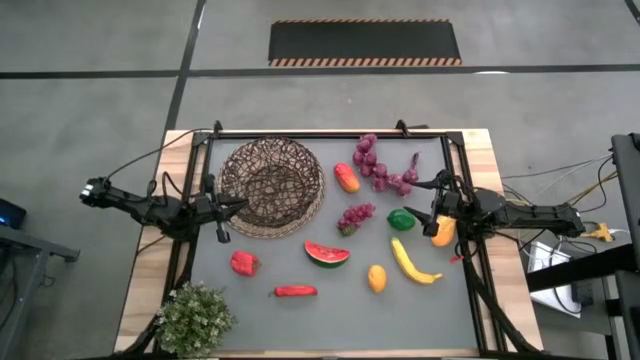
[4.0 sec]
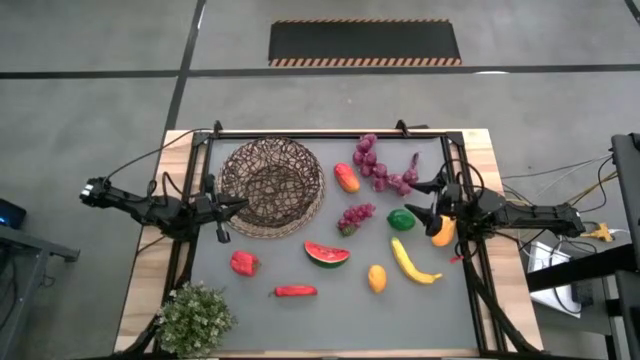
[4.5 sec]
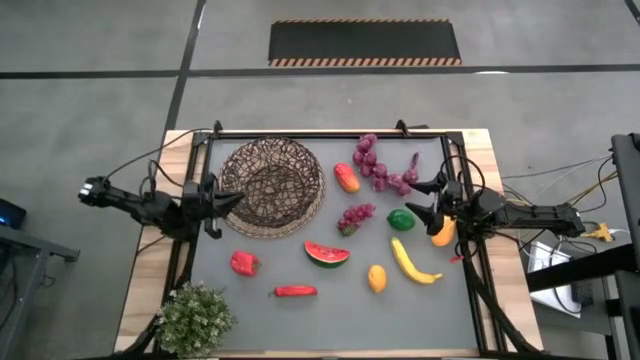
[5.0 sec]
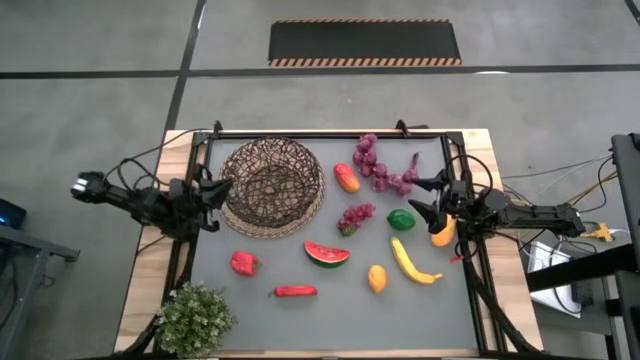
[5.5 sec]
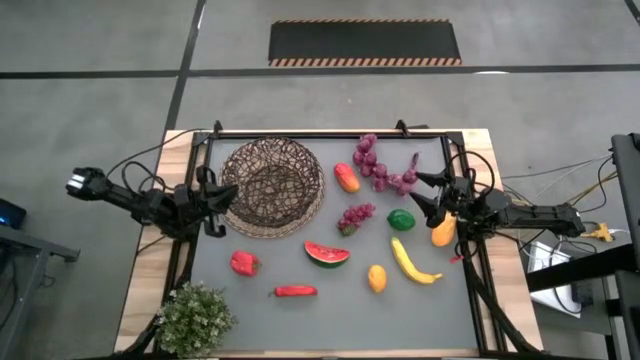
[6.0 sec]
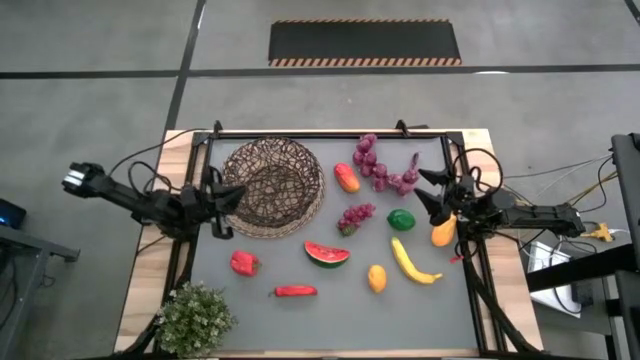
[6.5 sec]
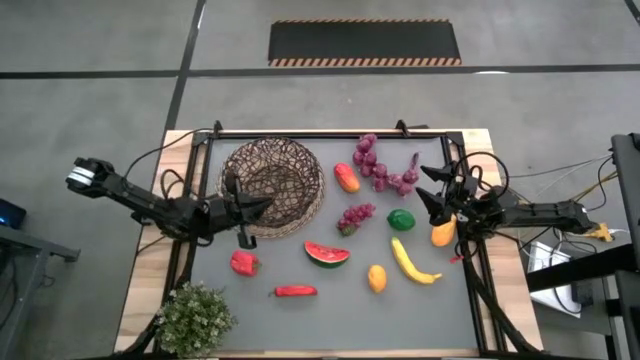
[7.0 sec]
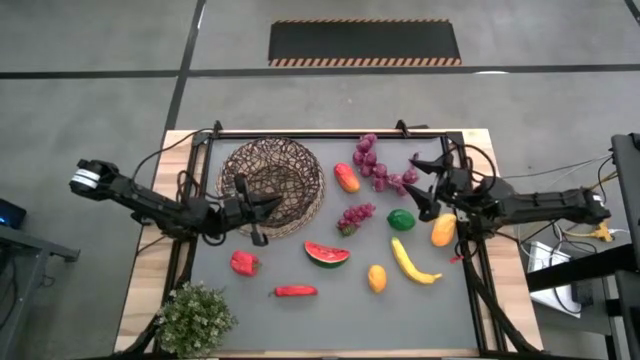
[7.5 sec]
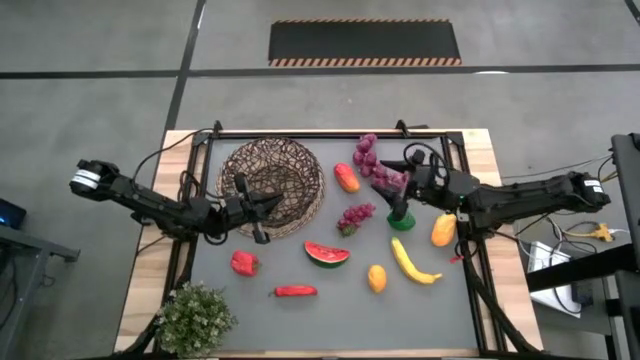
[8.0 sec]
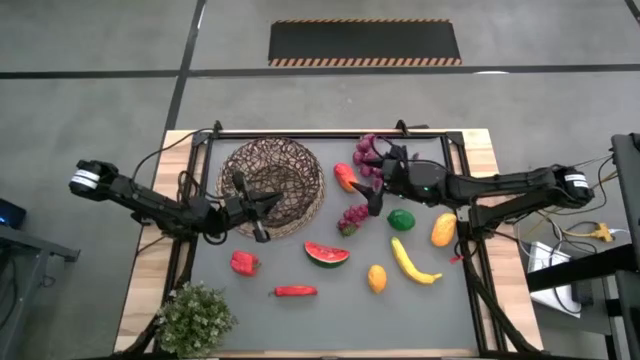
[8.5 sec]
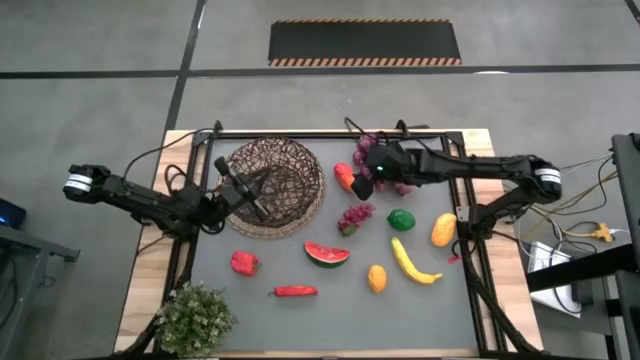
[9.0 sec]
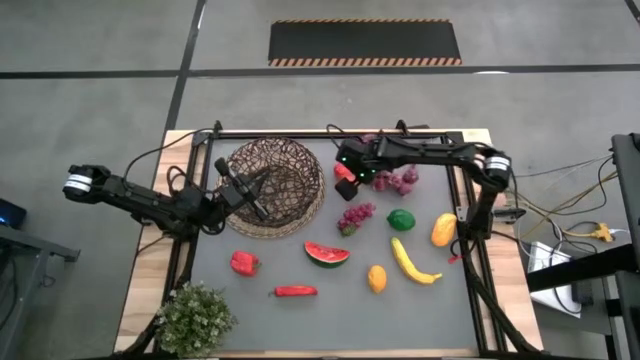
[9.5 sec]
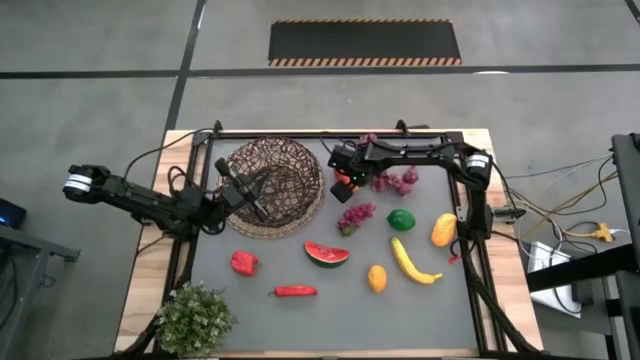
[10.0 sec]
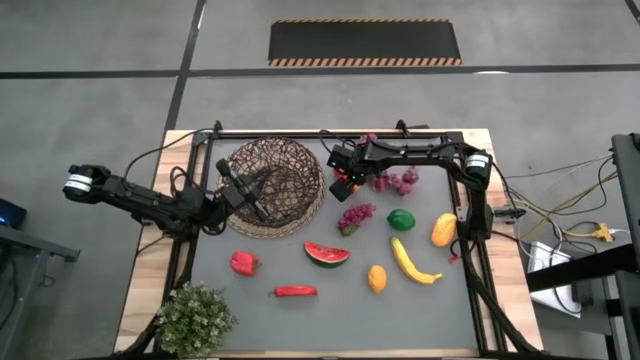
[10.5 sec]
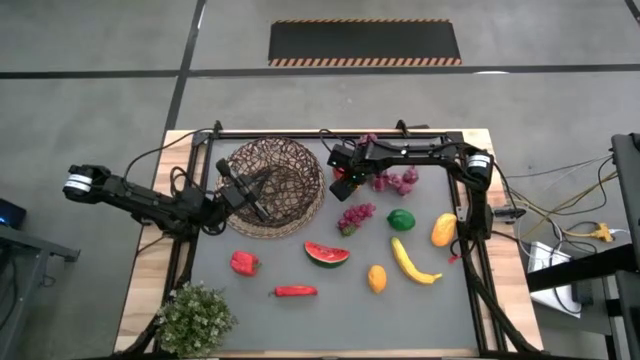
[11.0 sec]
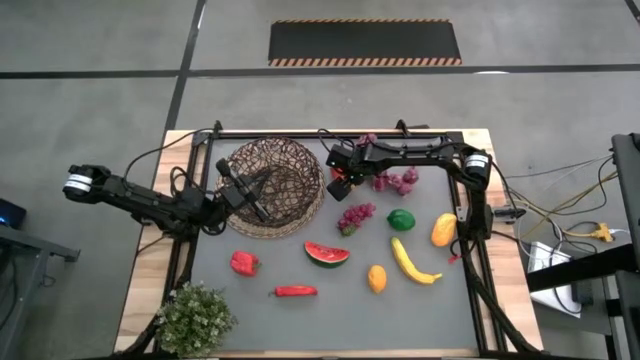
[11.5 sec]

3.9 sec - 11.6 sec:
Task: Build produce basket
Put the red mango into the wire basket

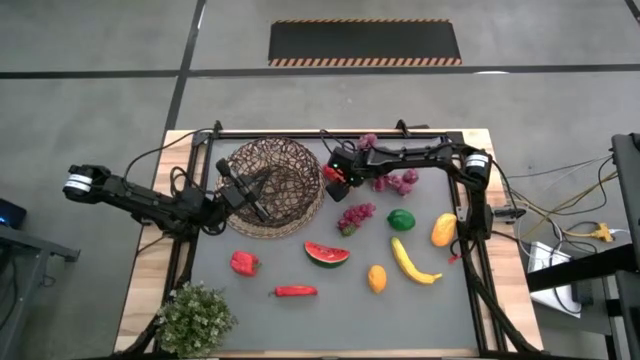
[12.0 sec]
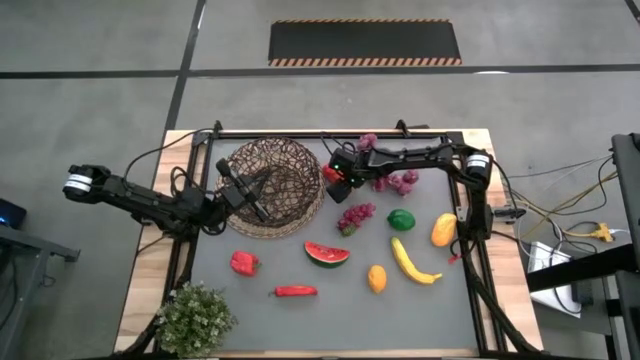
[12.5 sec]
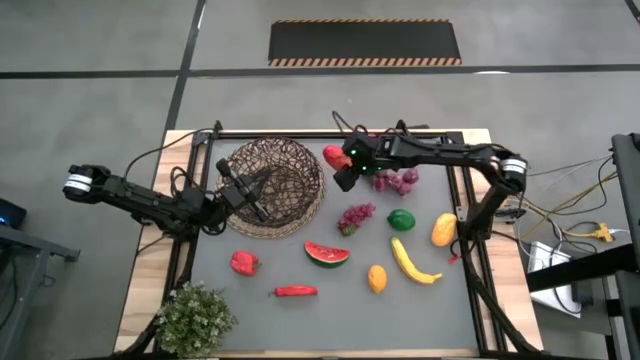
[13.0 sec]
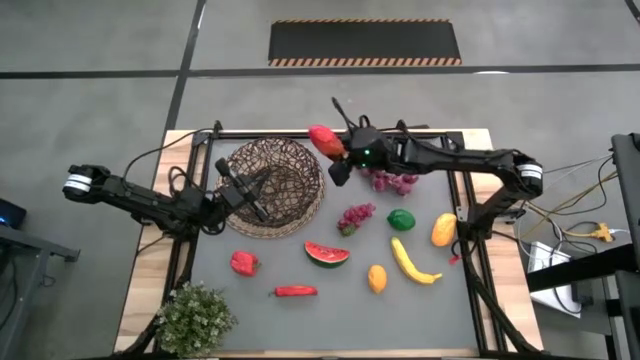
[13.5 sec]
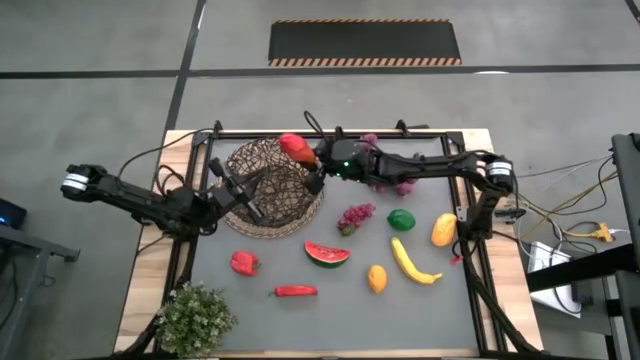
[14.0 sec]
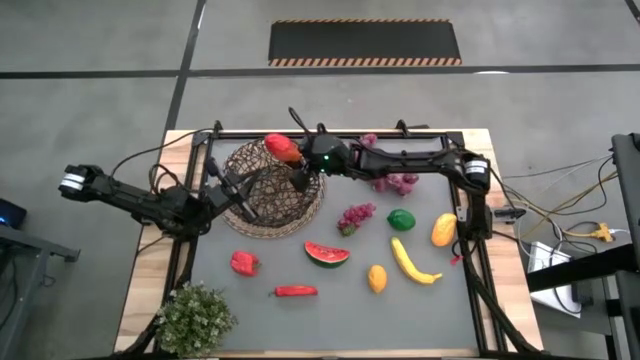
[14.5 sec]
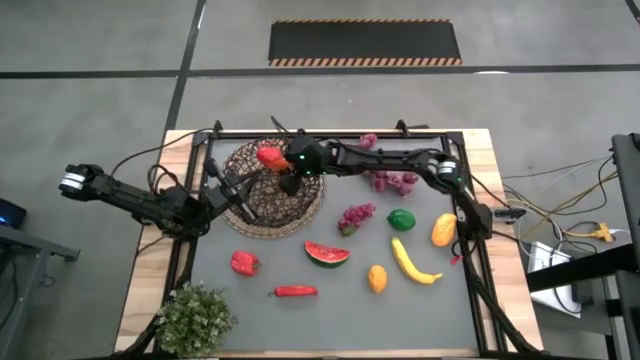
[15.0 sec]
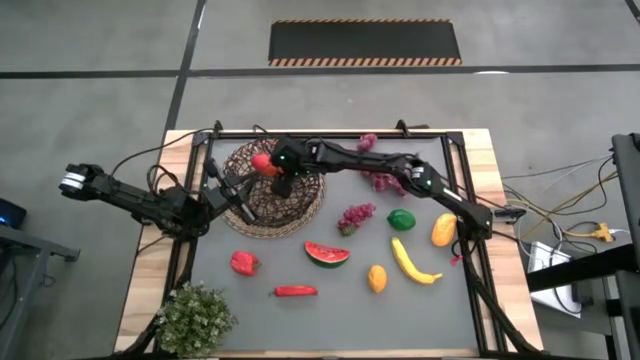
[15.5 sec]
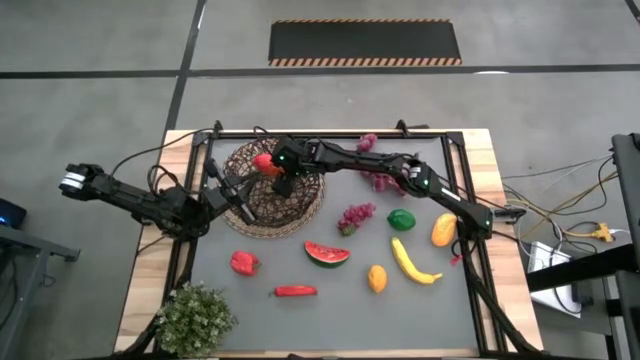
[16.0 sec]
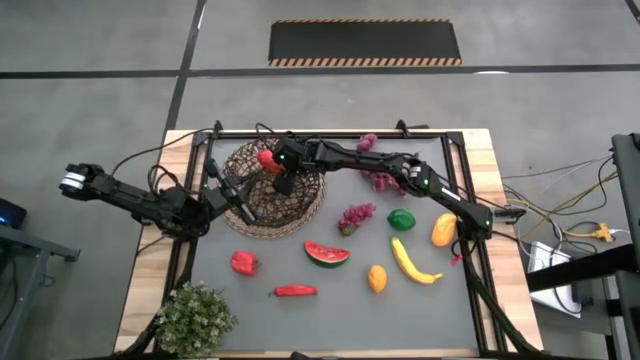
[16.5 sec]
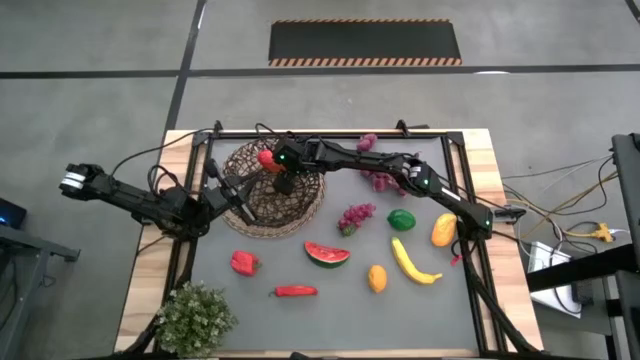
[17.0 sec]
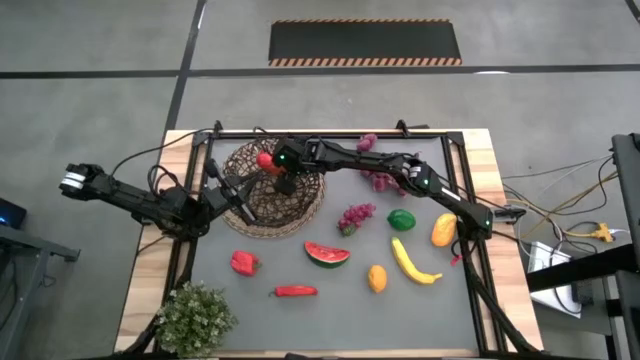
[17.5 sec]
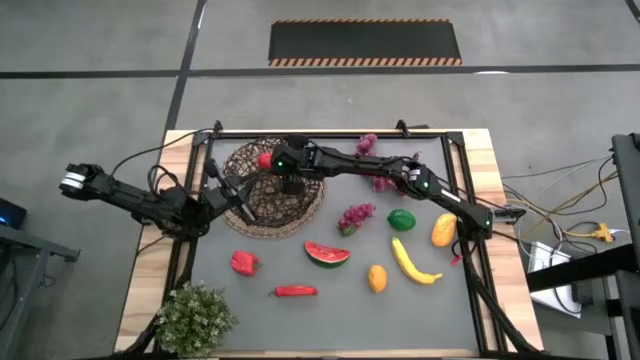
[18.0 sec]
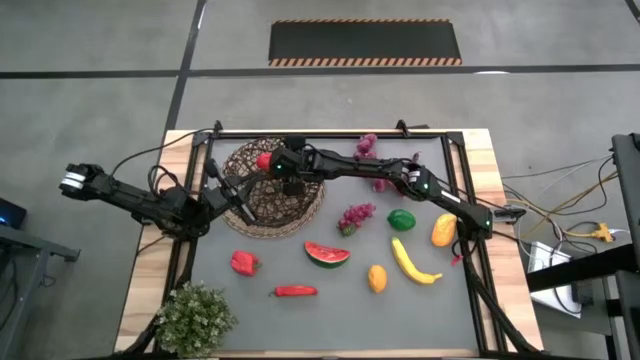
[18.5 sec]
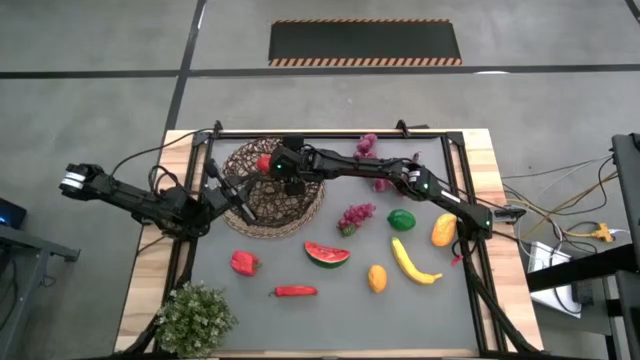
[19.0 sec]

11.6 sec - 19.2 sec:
Put the red mango into the wire basket

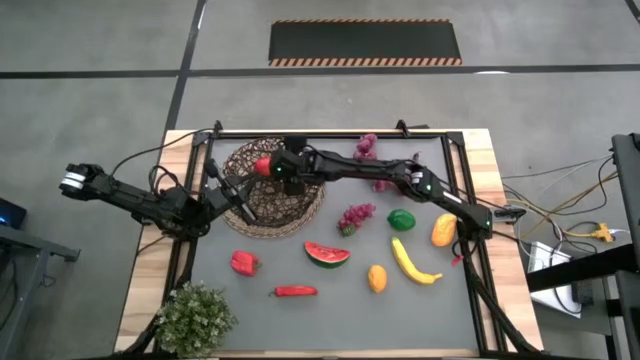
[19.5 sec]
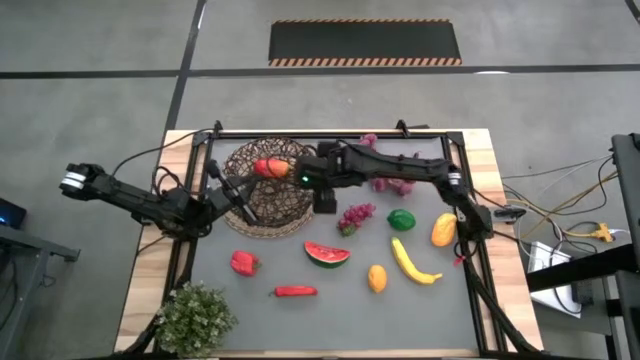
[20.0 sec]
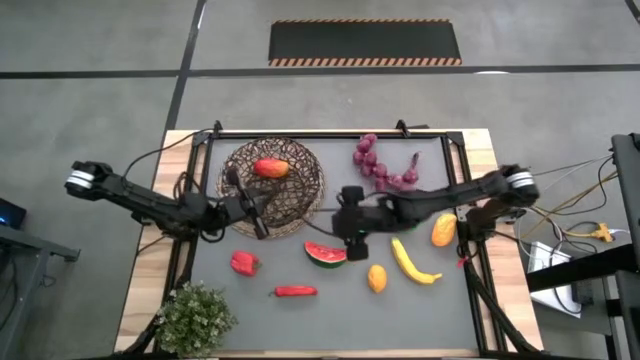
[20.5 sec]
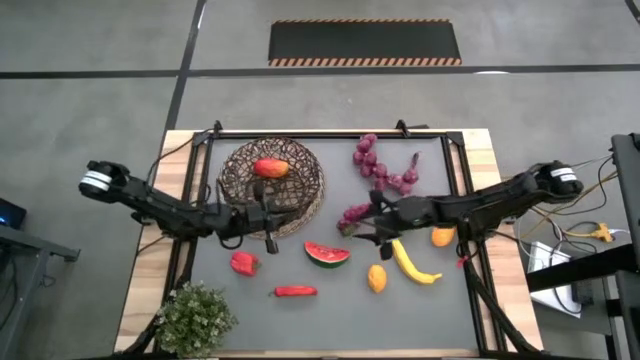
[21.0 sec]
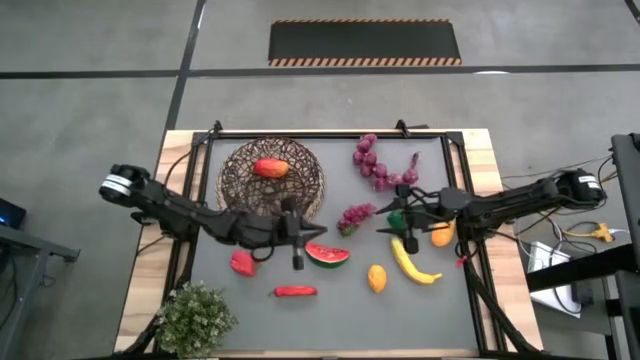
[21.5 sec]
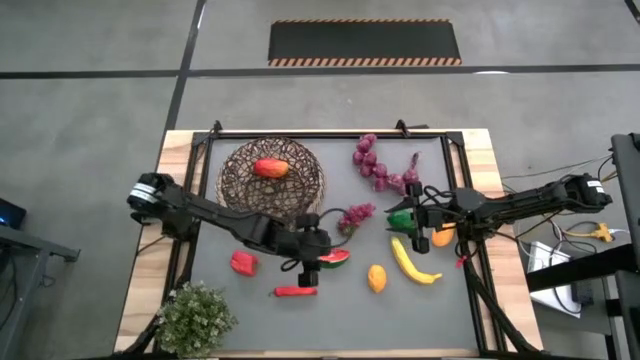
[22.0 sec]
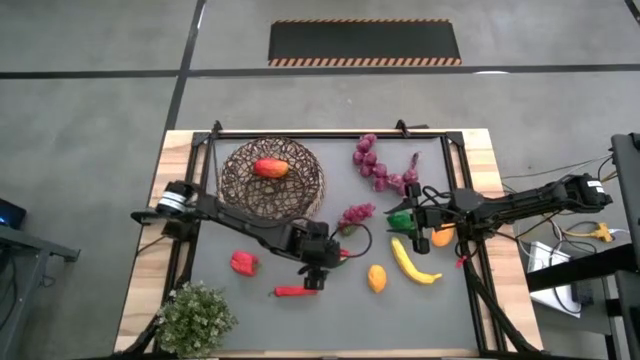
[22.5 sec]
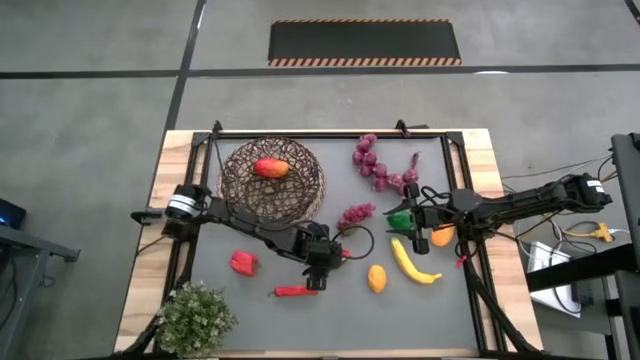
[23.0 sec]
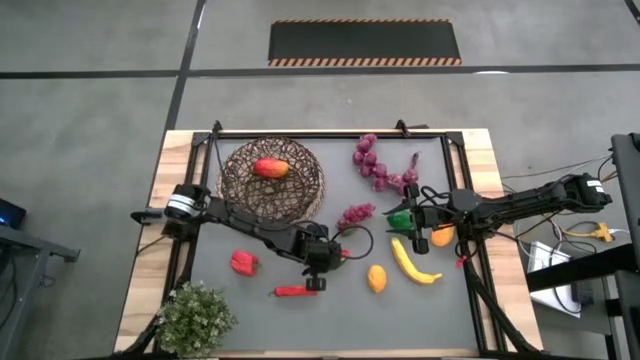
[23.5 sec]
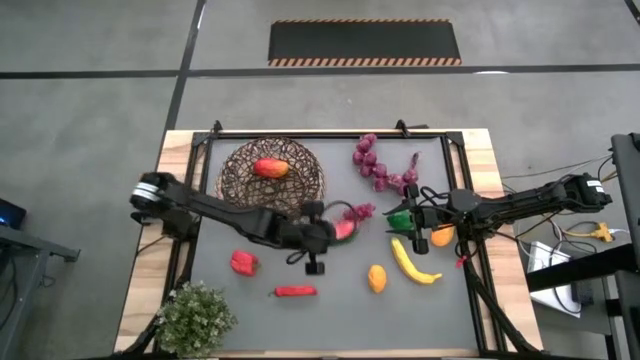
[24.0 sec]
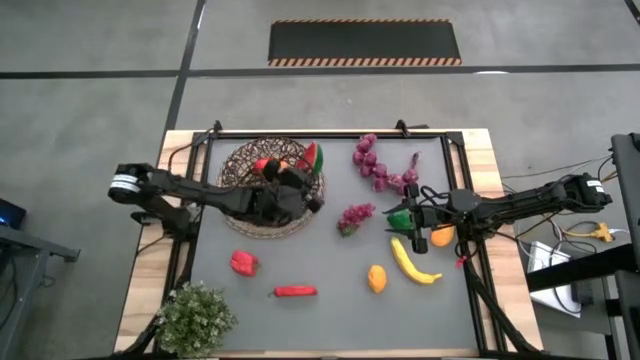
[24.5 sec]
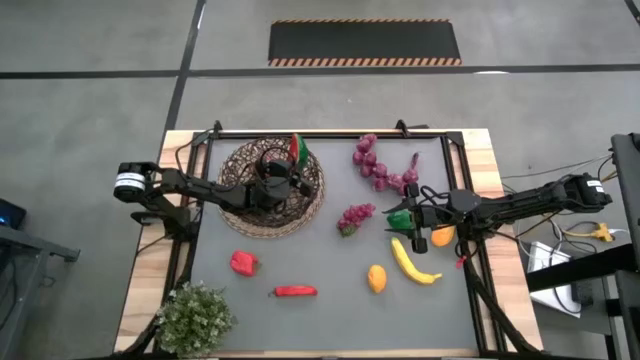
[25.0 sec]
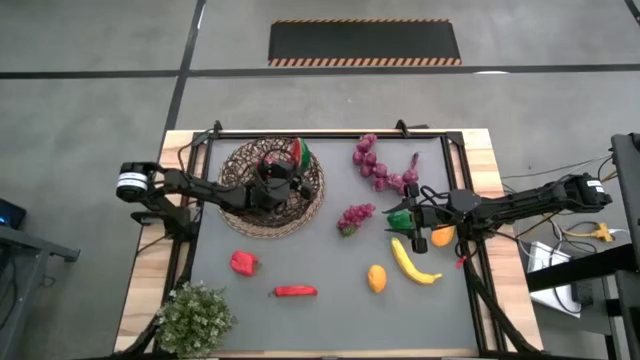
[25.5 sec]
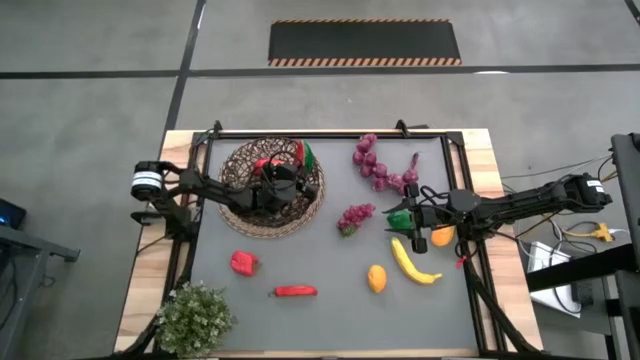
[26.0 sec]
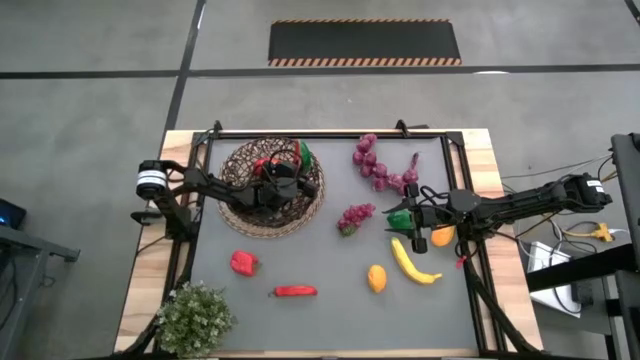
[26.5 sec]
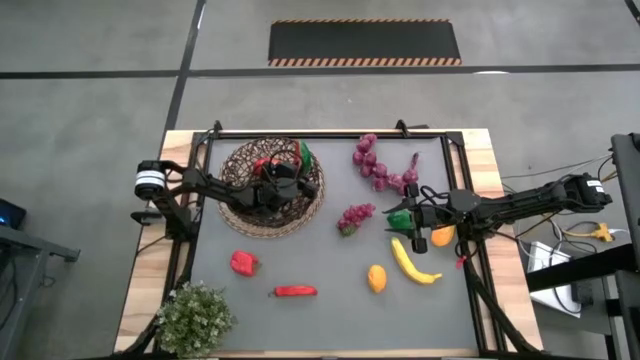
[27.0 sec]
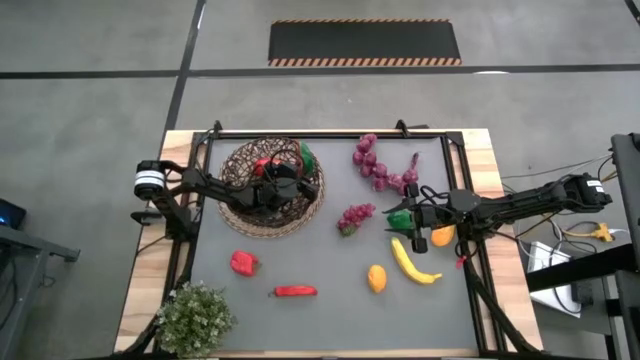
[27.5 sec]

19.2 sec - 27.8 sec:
Put the watermelon into the wire basket
